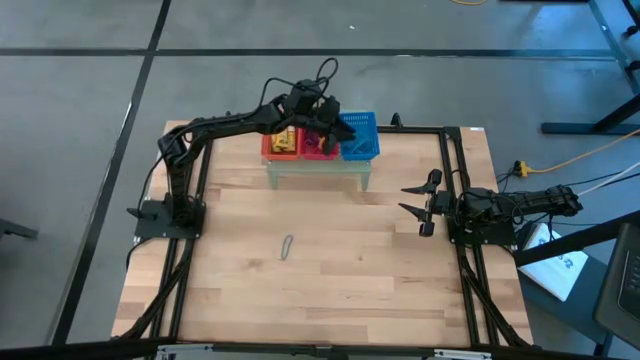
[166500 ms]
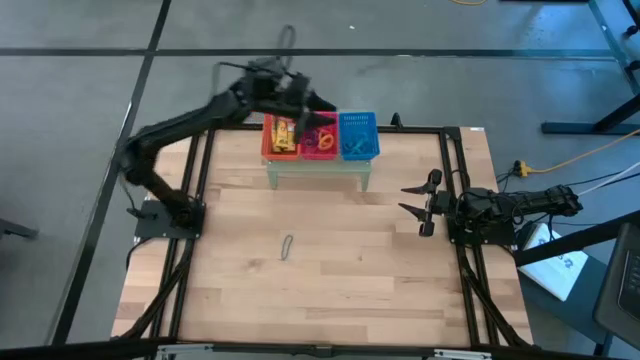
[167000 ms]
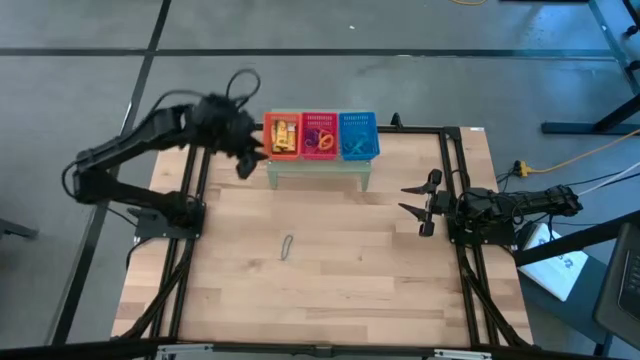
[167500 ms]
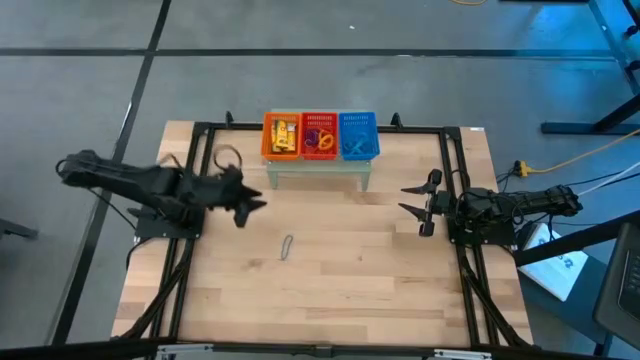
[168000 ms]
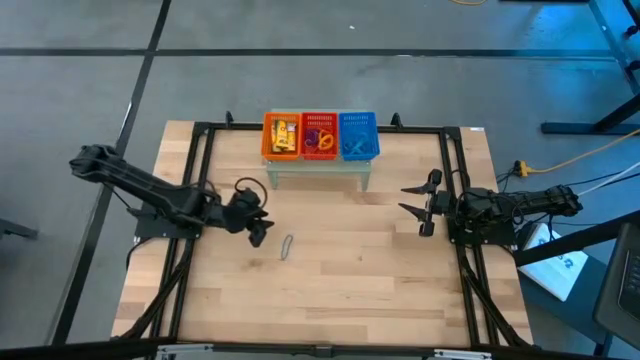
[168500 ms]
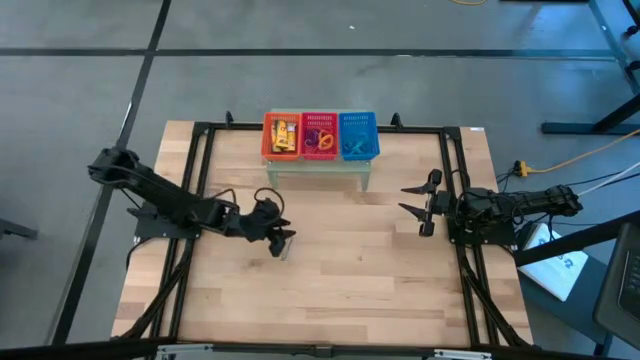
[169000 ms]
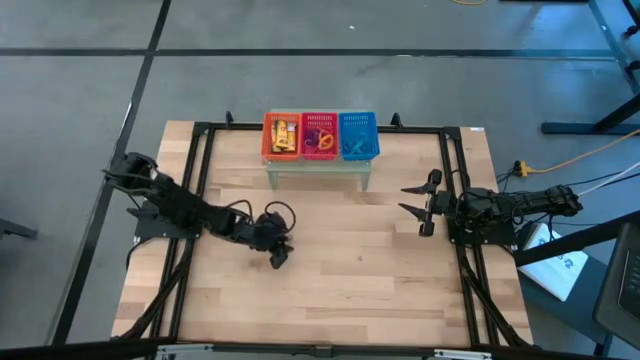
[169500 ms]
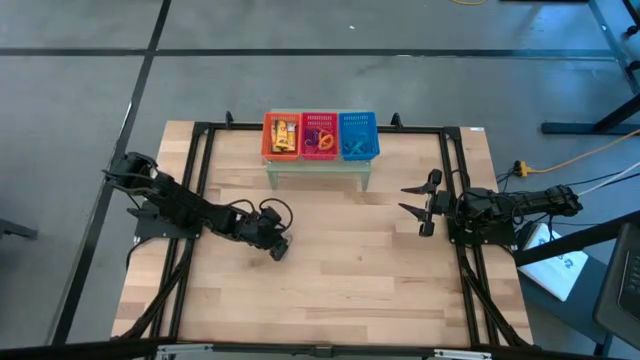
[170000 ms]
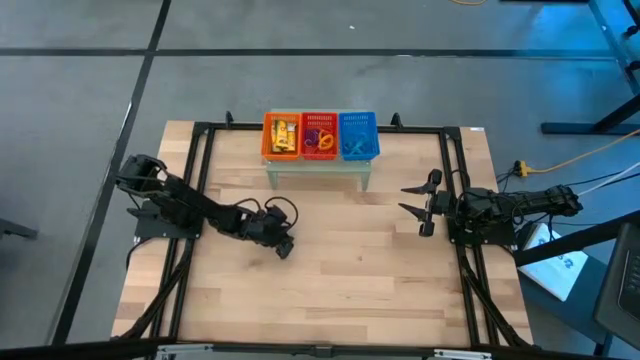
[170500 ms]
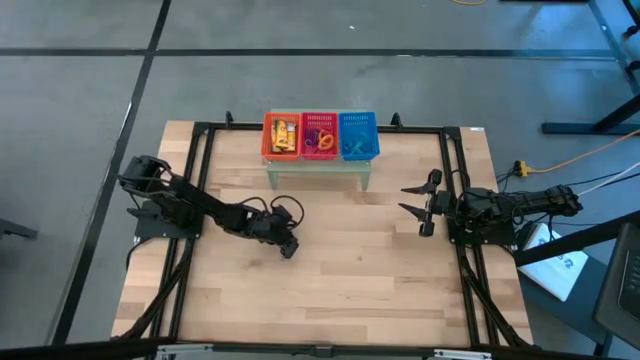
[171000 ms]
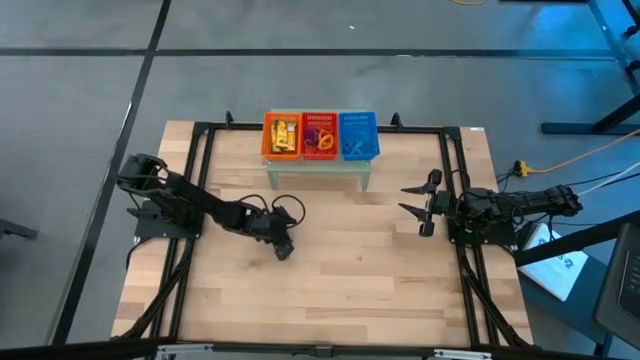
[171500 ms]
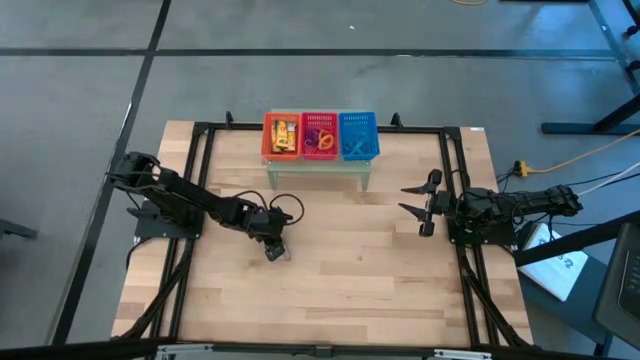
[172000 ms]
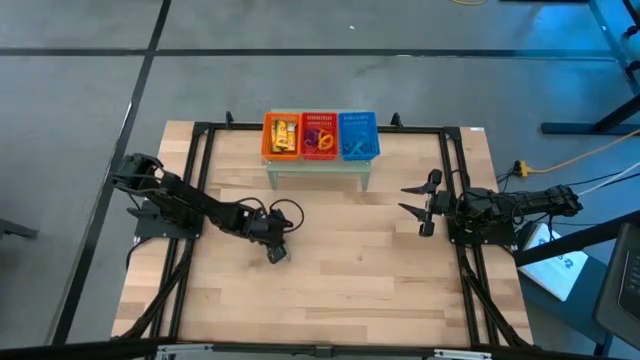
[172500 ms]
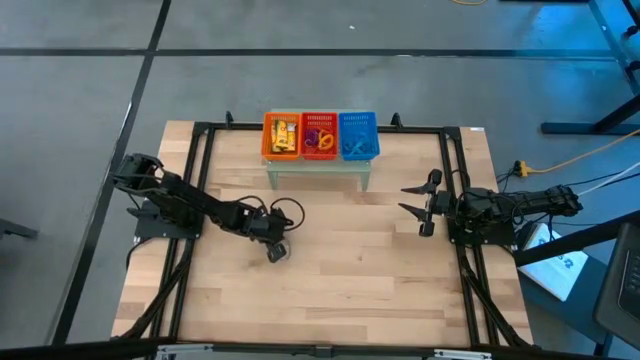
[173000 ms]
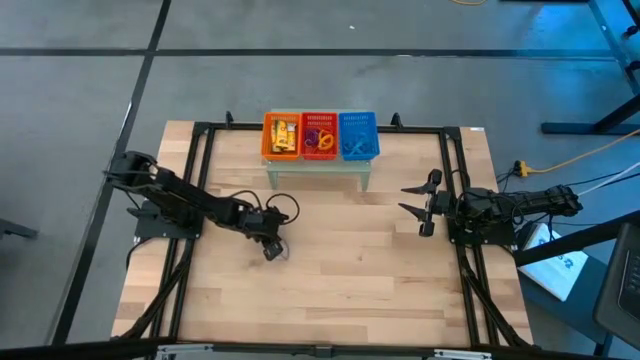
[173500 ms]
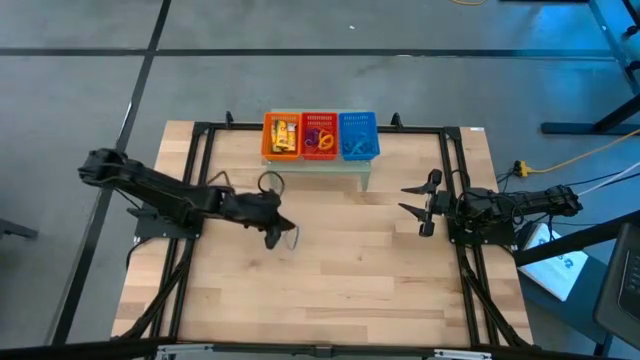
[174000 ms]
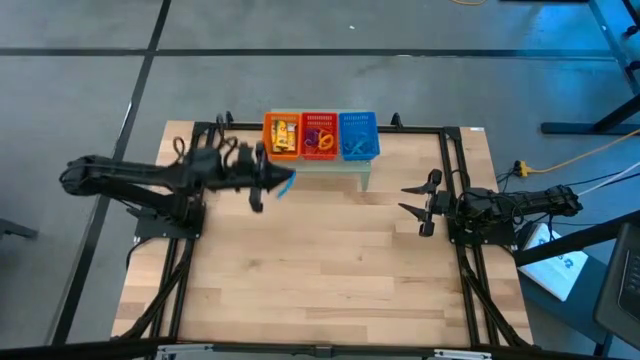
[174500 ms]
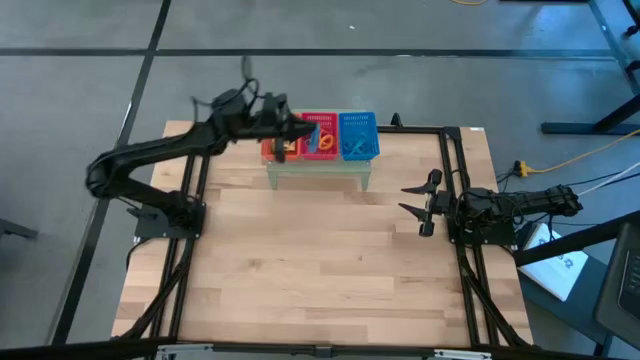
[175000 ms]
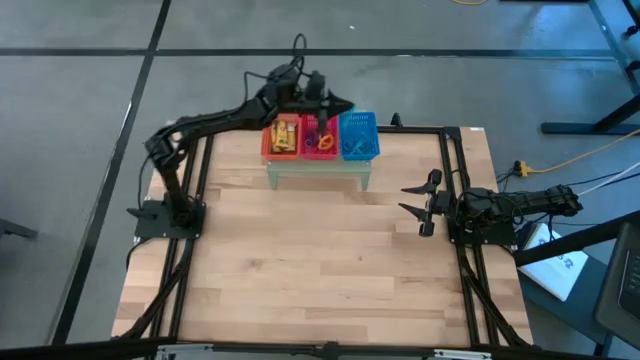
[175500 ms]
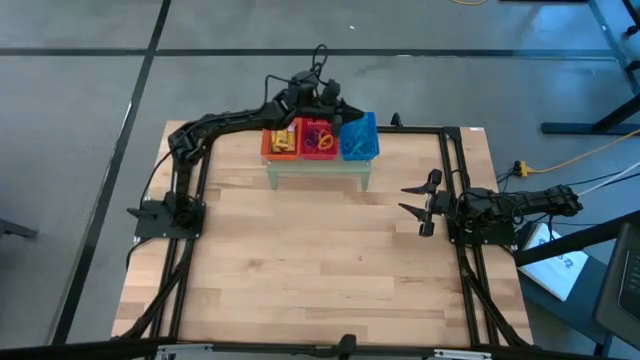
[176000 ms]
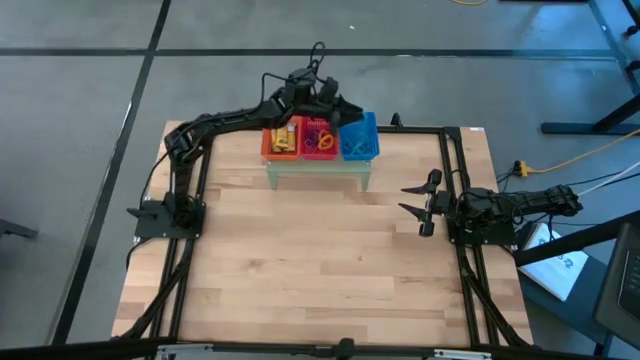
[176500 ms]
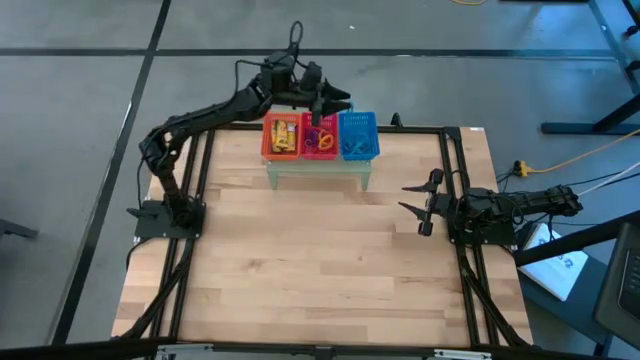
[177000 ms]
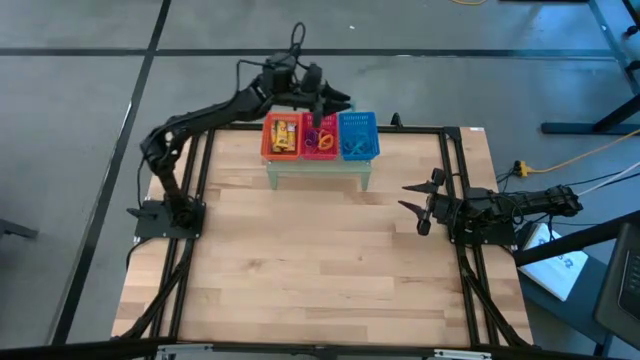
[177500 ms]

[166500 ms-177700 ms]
Task: Pick & Place Office Desk Supplies
Put the blue rubber band into the blue bin on the shelf

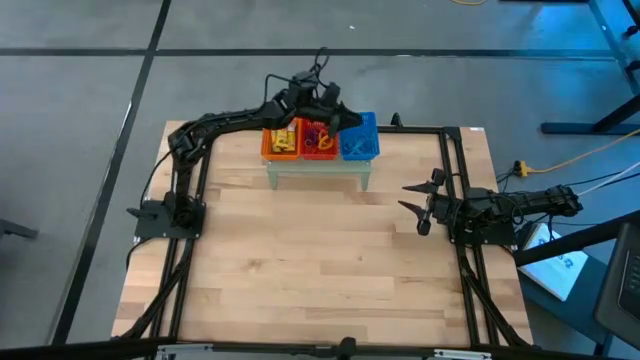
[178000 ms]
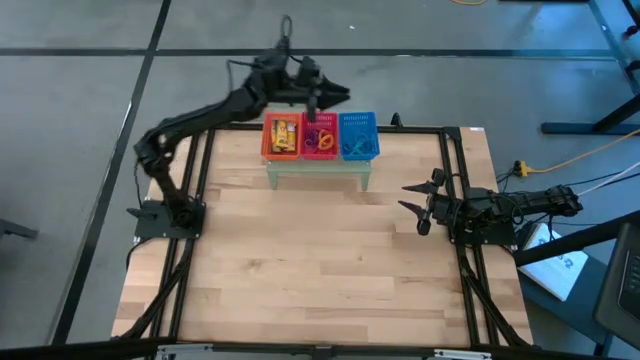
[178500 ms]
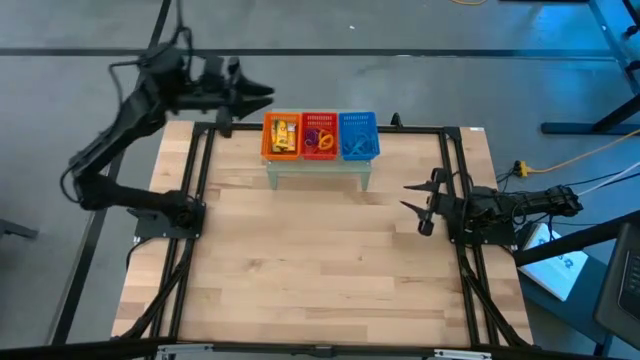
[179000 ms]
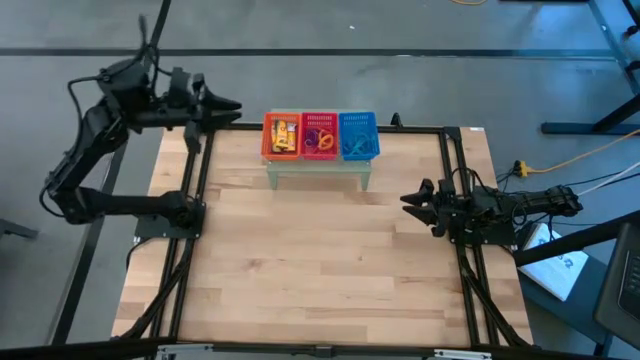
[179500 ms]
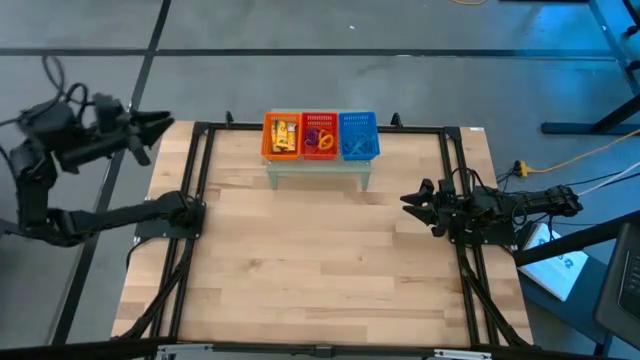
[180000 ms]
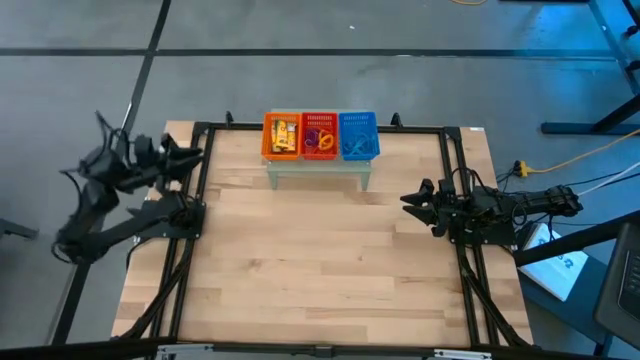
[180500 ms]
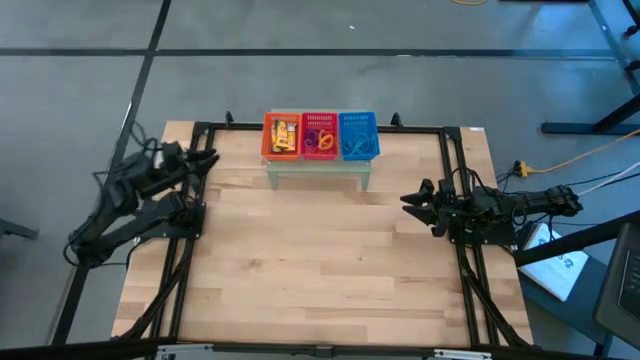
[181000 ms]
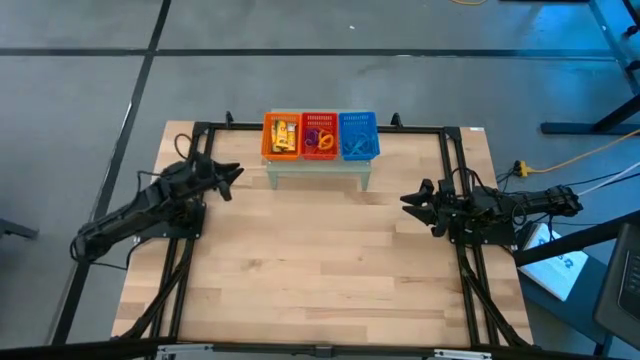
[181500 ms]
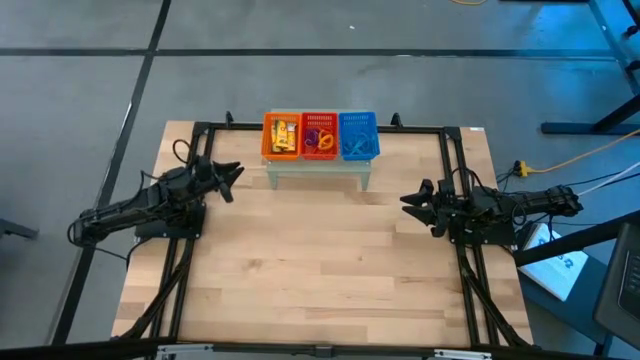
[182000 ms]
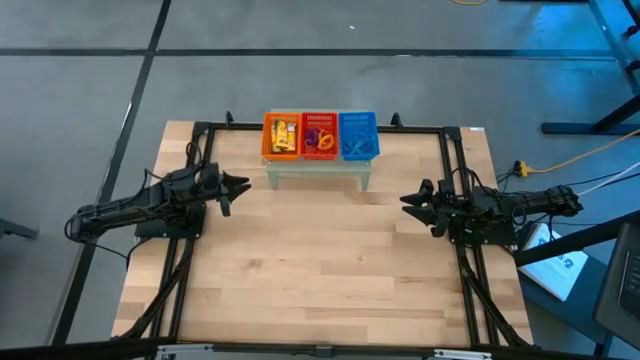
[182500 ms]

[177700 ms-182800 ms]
Return to Home Position

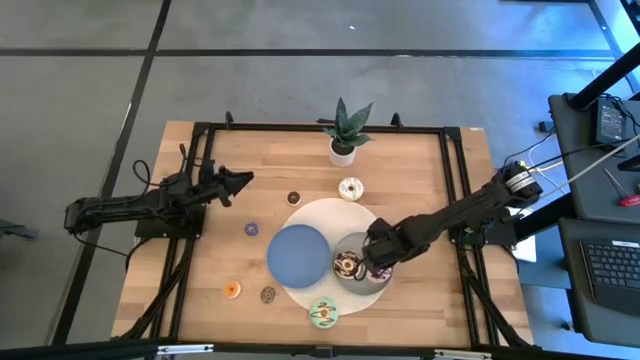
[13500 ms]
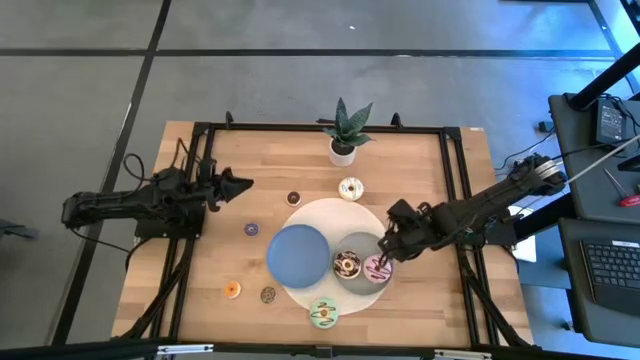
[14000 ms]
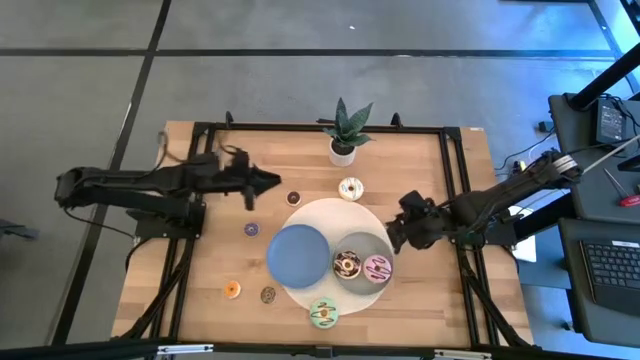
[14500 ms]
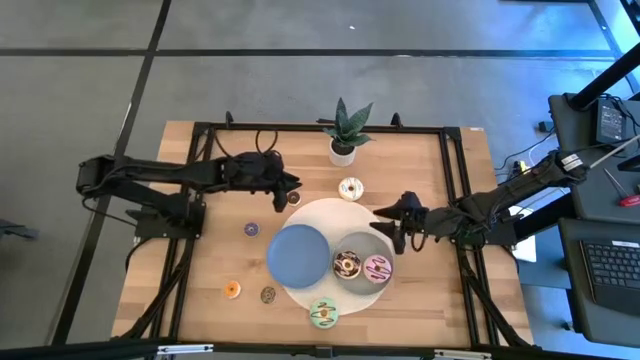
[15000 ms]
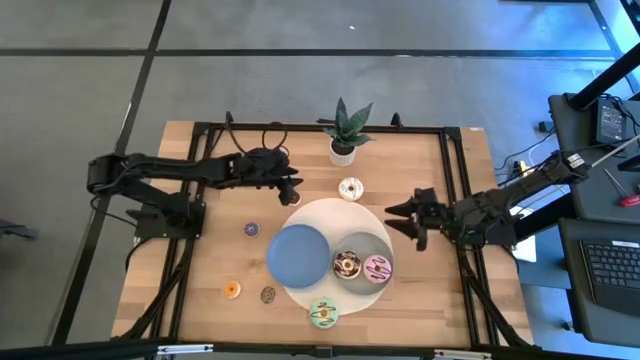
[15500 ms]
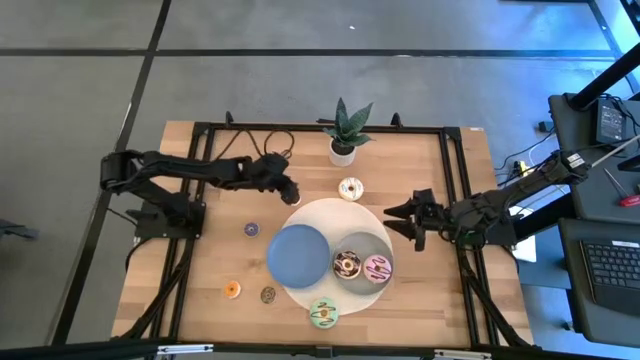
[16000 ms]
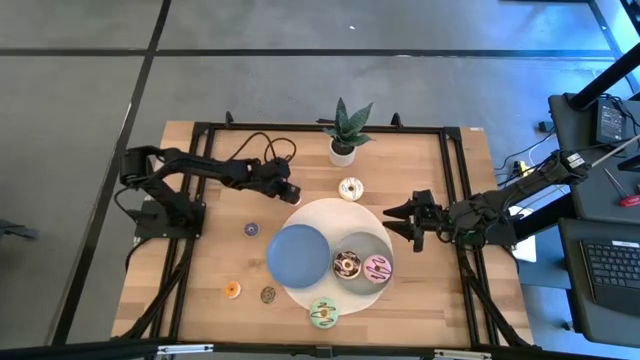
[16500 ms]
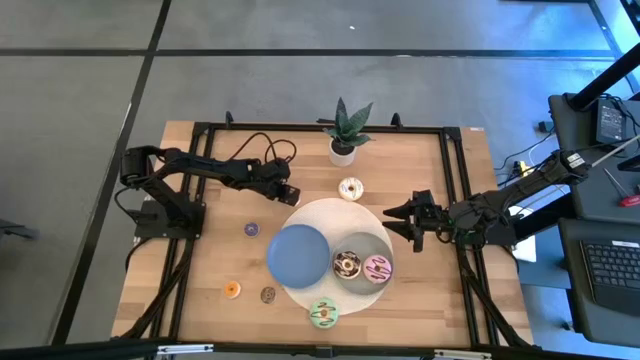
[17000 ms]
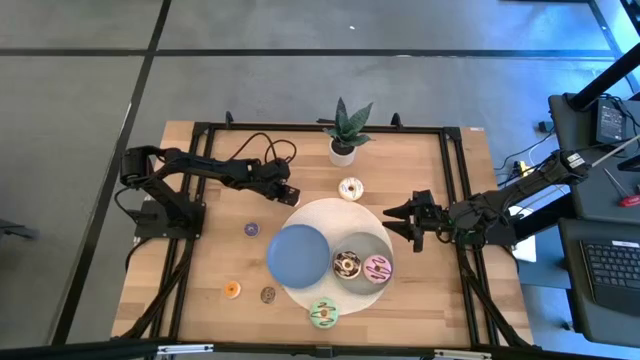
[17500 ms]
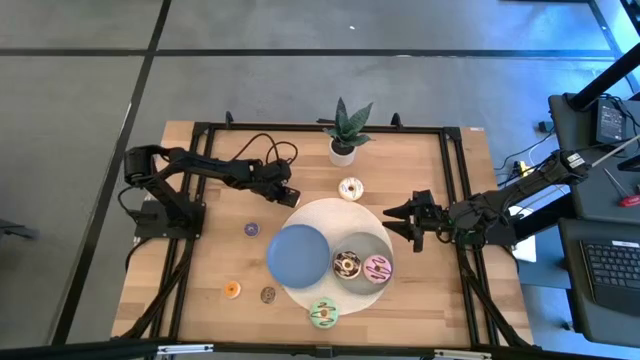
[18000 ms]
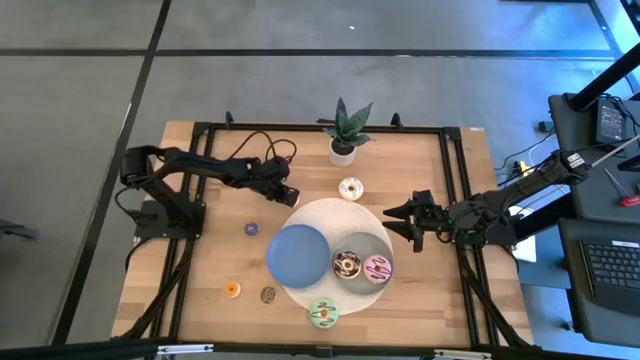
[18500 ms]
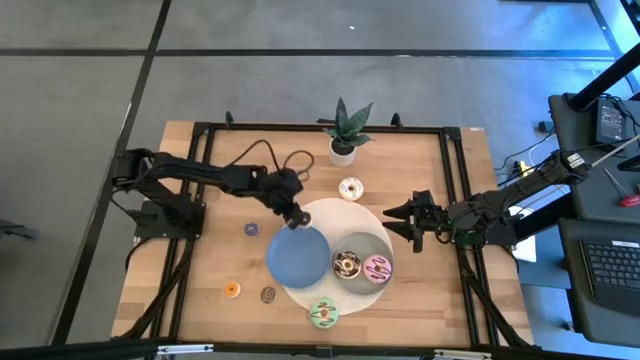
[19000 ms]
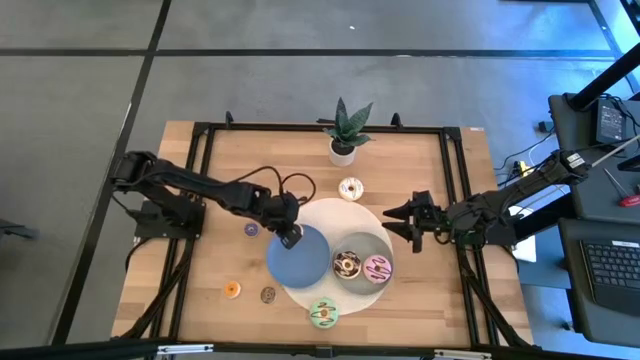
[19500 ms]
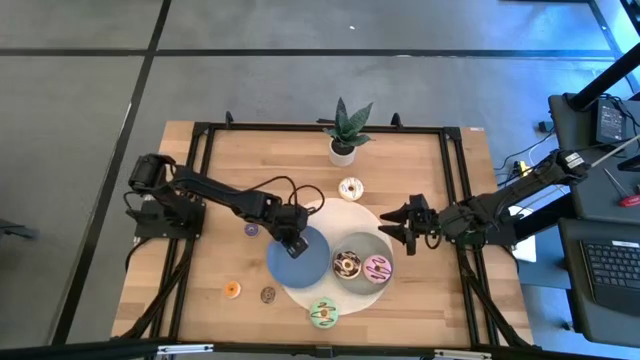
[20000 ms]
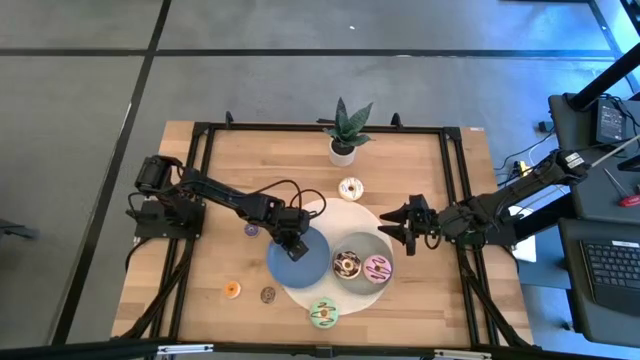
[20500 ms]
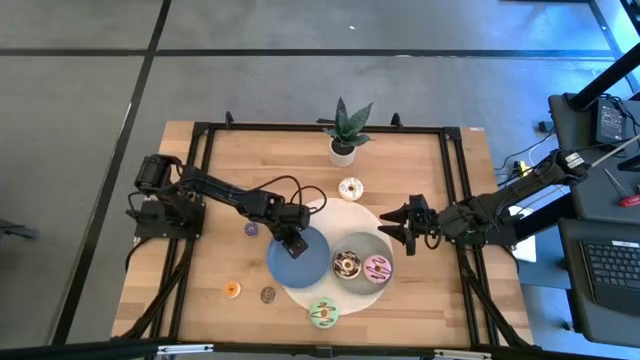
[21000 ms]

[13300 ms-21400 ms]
Task: Pick & Place donuts
Put the small dark brown donut on the blue plate
